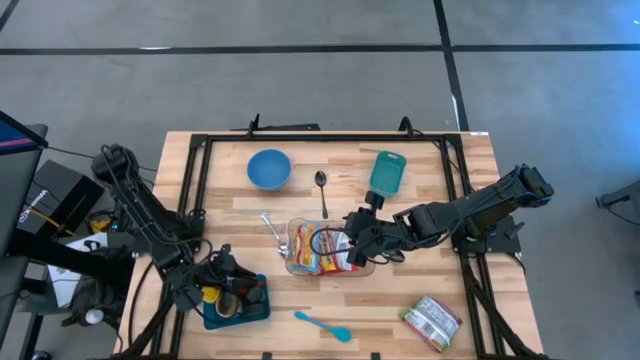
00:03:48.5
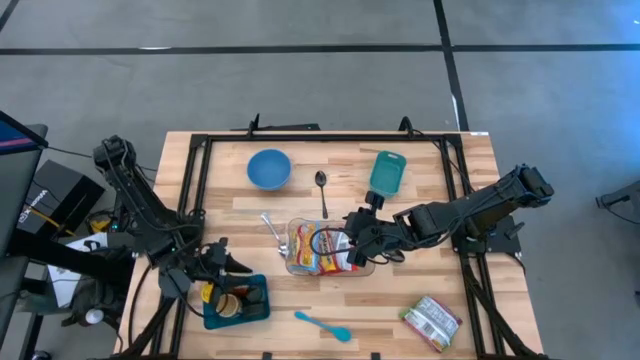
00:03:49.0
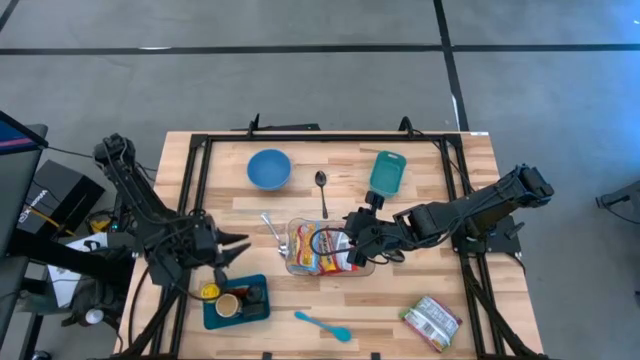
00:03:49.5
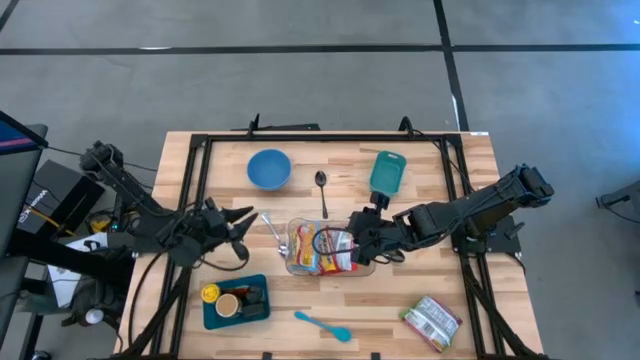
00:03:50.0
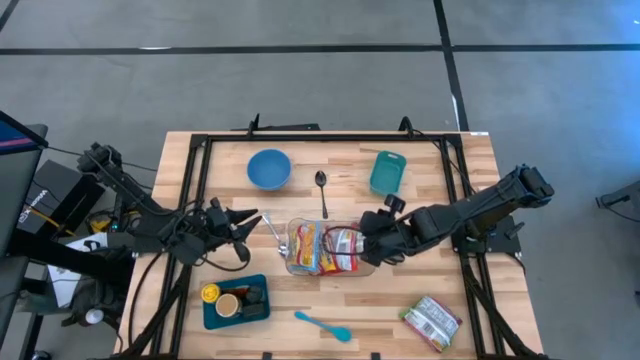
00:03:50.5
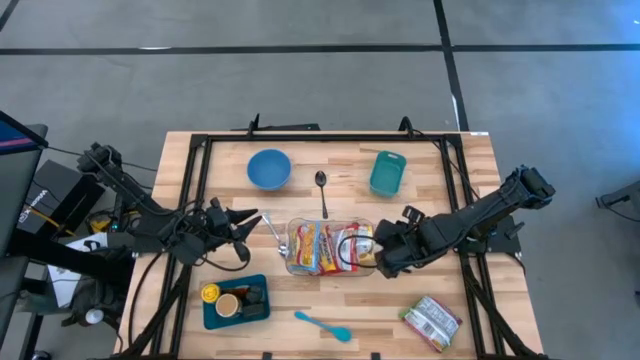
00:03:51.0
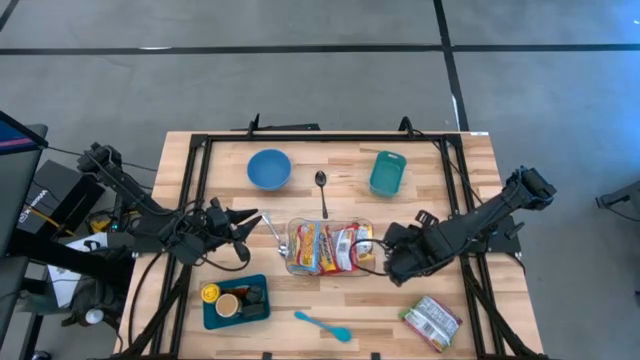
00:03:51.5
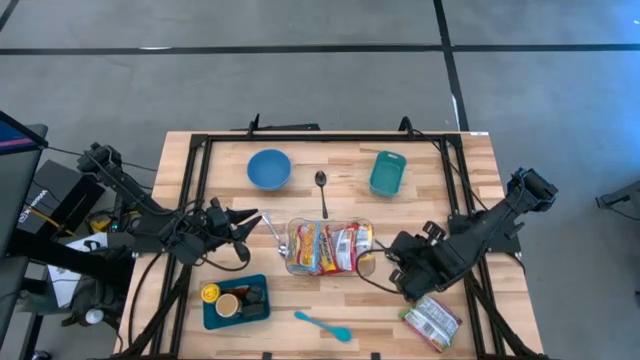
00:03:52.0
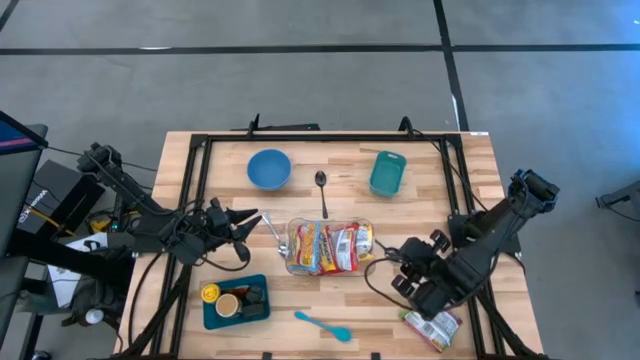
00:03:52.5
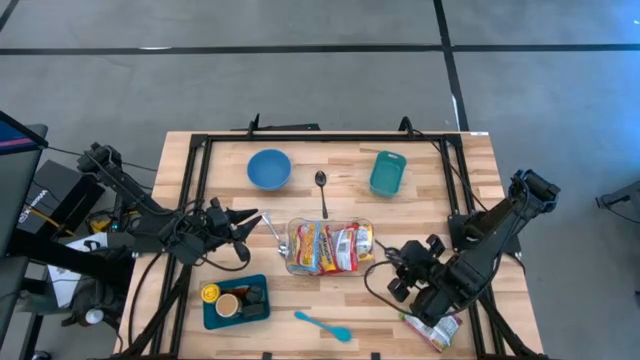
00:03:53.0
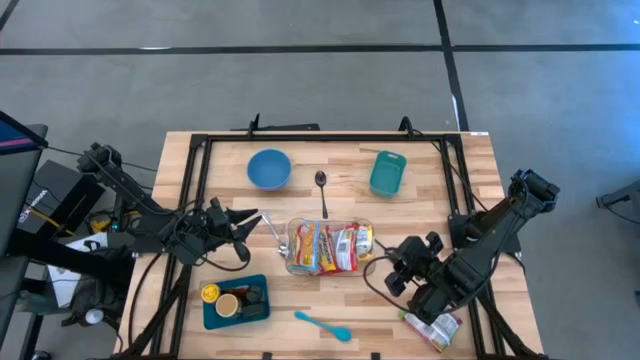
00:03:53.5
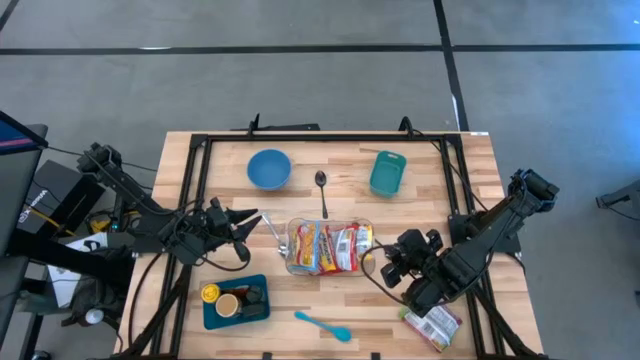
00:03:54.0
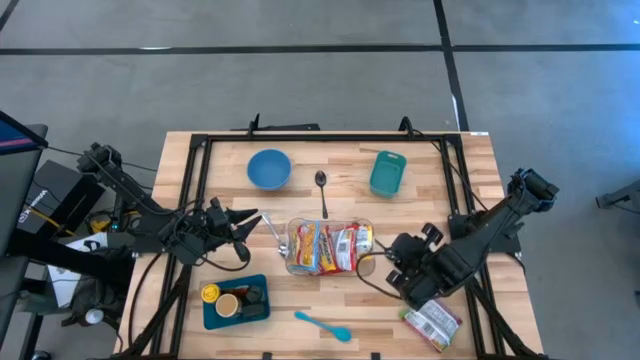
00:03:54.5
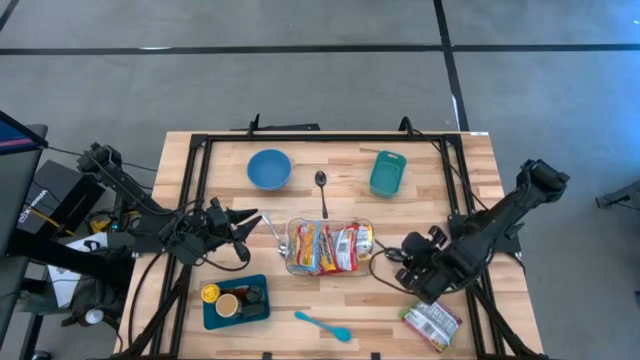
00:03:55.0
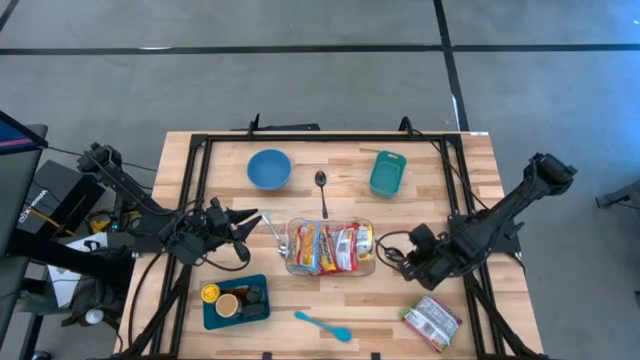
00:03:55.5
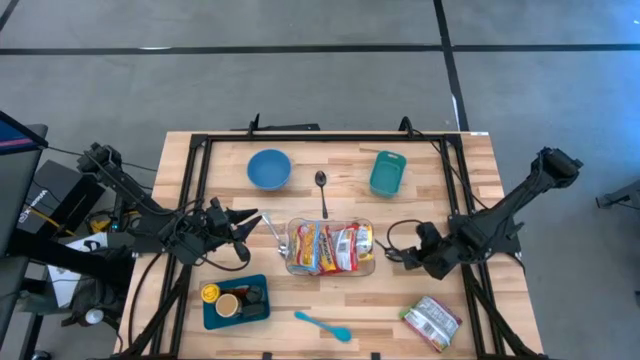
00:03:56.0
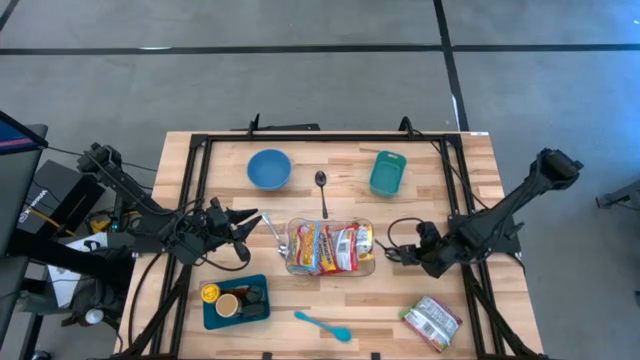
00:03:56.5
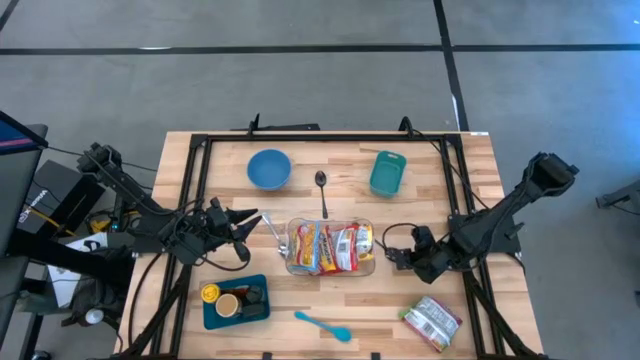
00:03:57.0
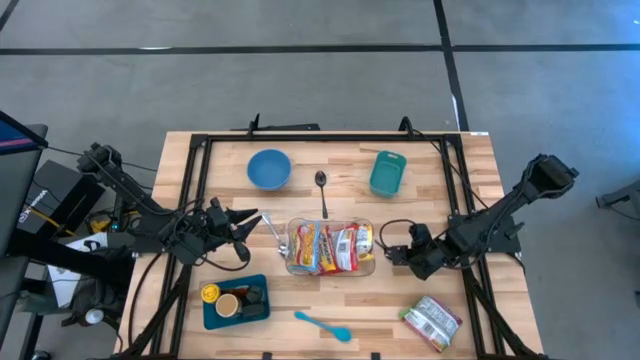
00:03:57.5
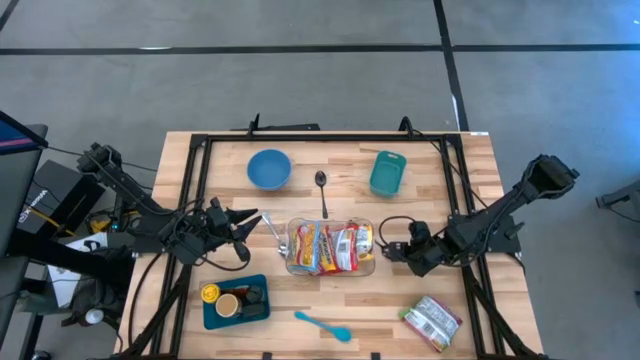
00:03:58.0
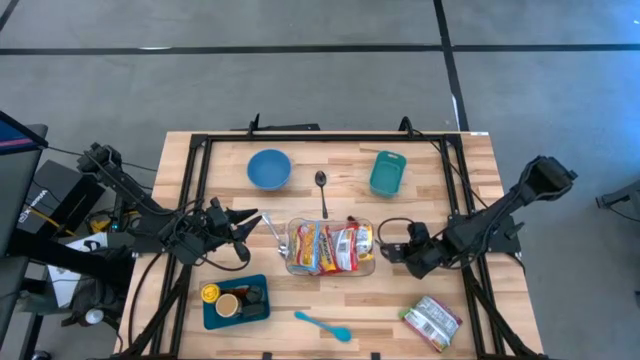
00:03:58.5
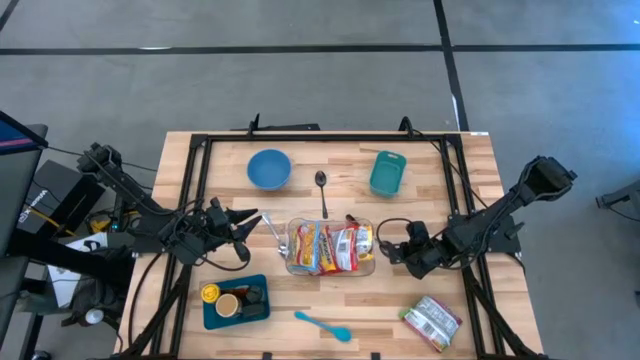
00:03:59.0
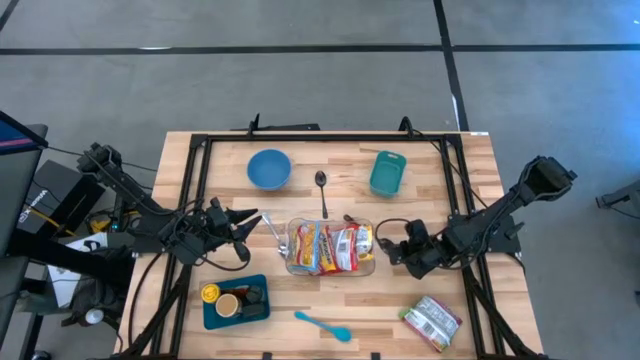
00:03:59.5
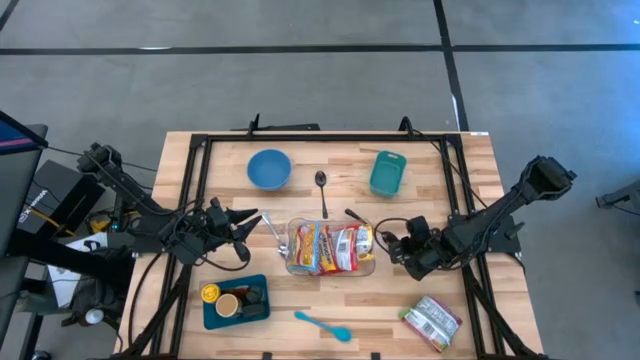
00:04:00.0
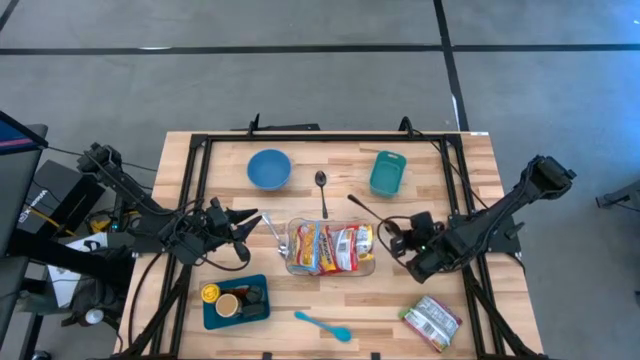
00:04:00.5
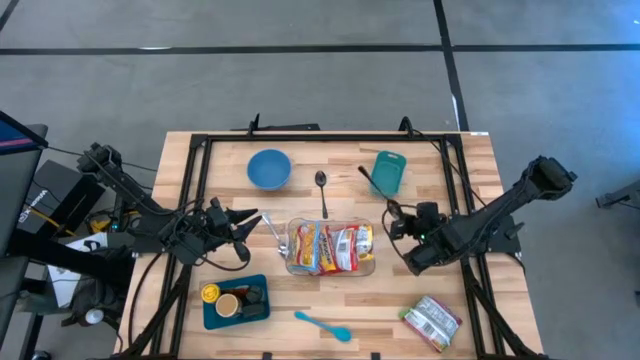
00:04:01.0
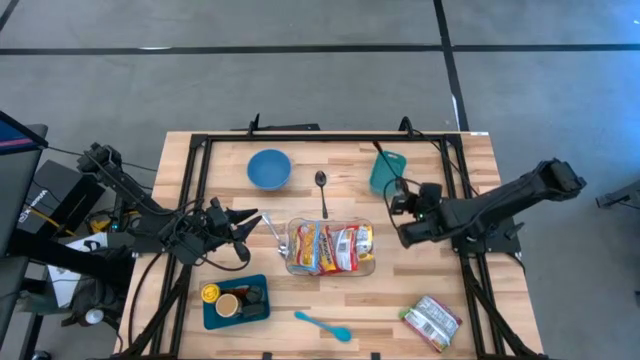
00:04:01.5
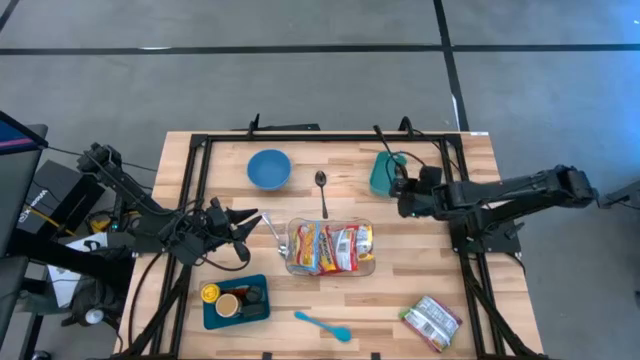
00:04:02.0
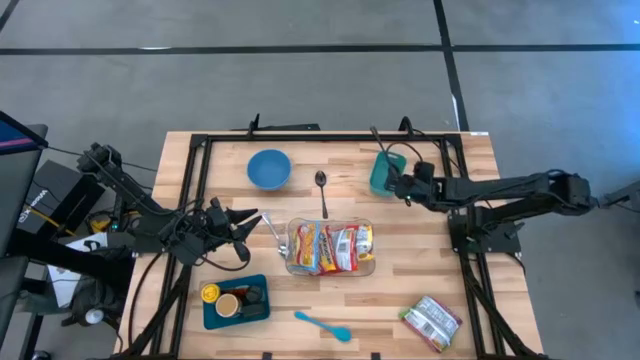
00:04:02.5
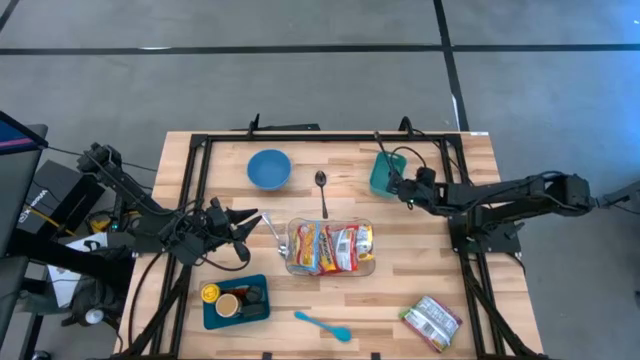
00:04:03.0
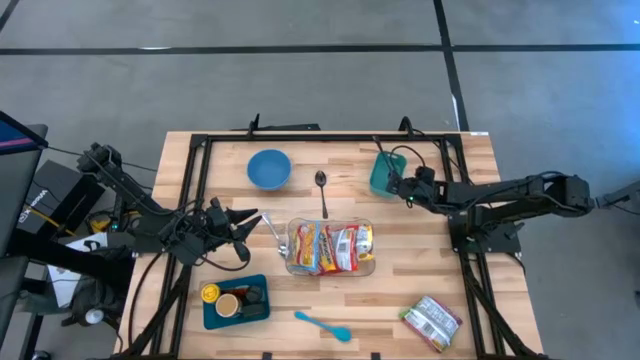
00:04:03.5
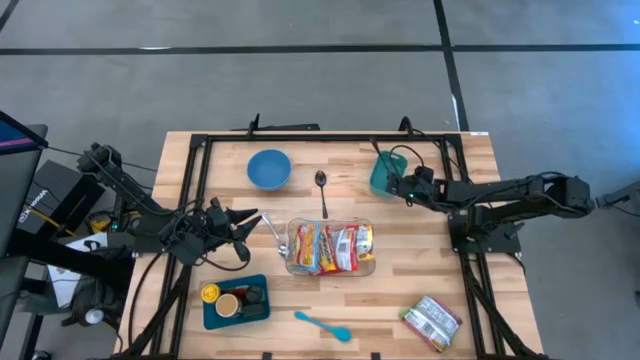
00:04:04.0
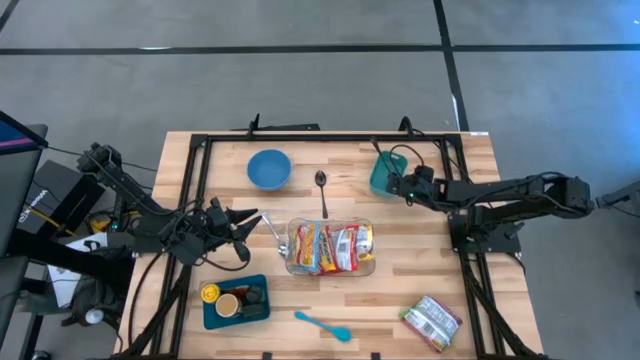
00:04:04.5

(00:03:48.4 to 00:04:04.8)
Task: Pick & Place Food Item
Put the bottom black spoon into the blue bin

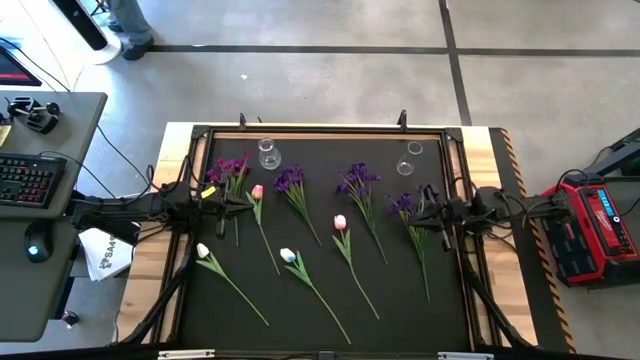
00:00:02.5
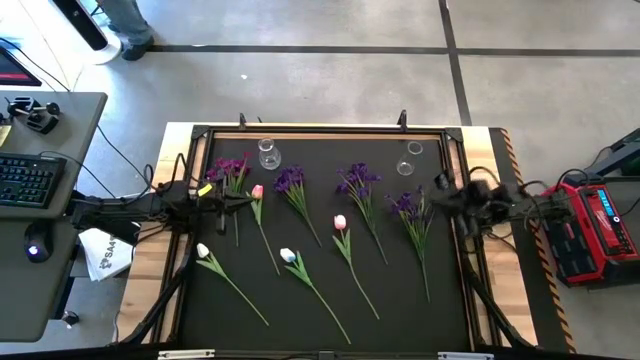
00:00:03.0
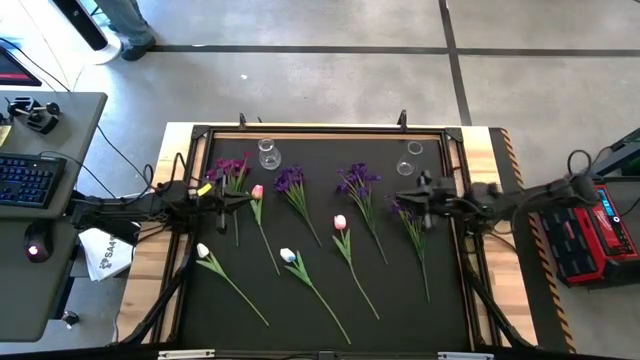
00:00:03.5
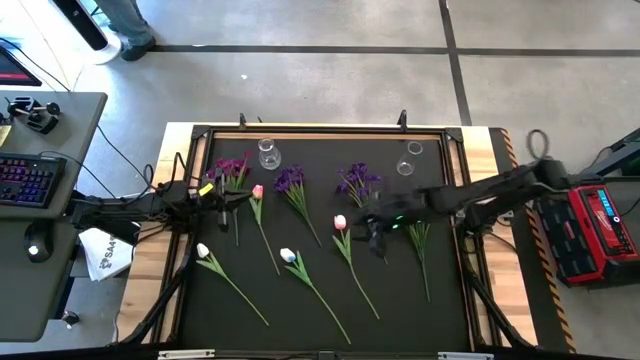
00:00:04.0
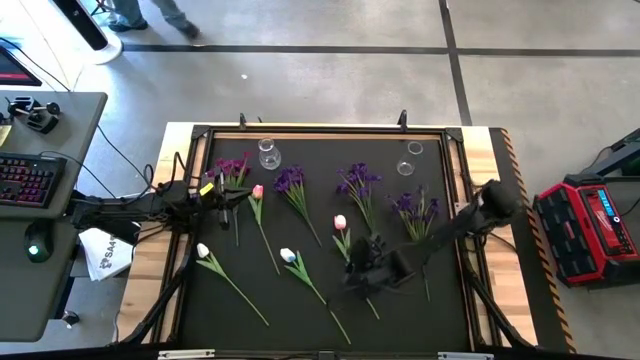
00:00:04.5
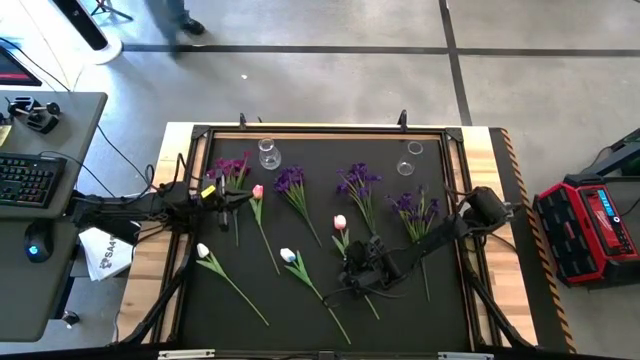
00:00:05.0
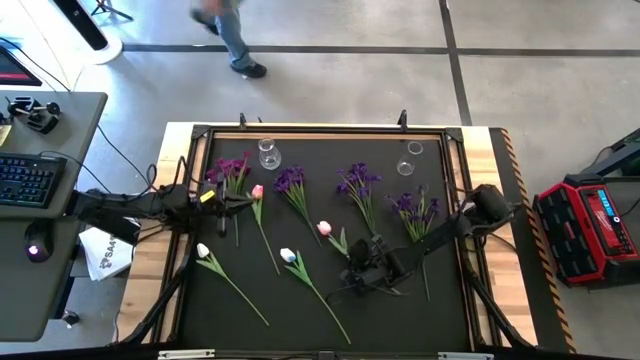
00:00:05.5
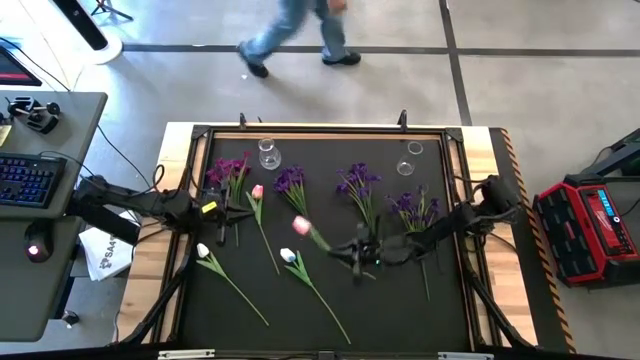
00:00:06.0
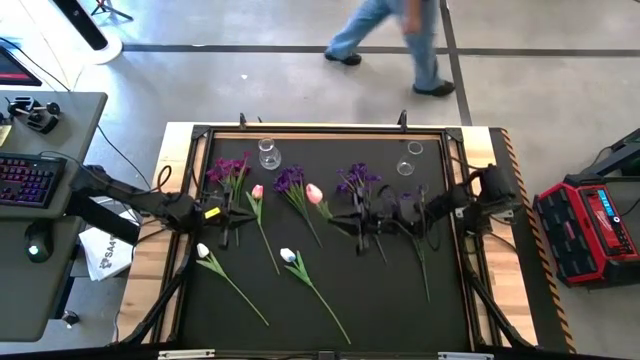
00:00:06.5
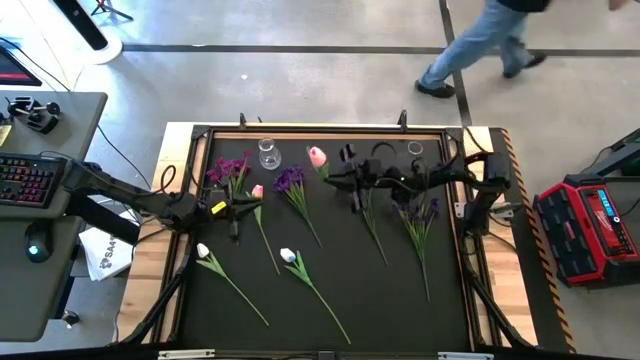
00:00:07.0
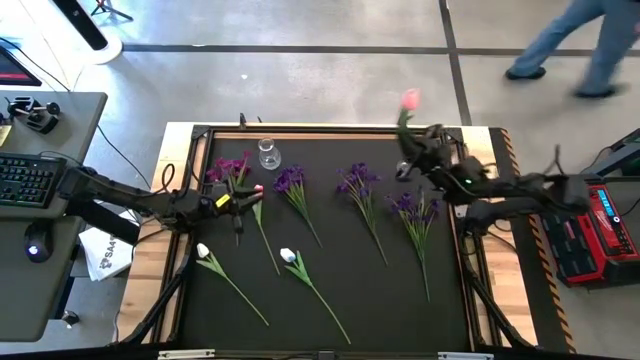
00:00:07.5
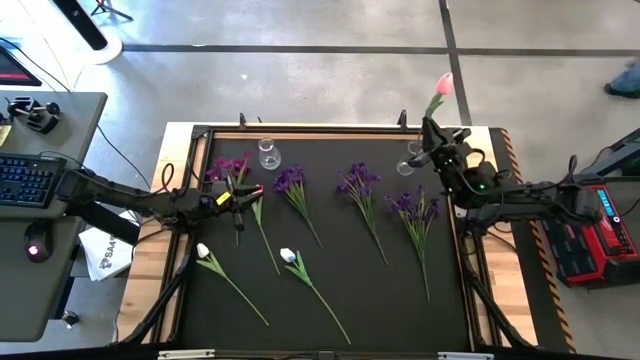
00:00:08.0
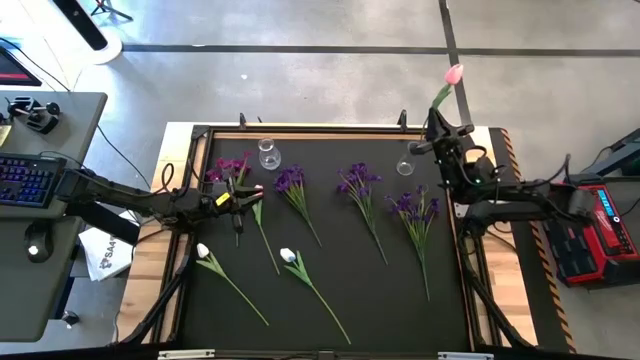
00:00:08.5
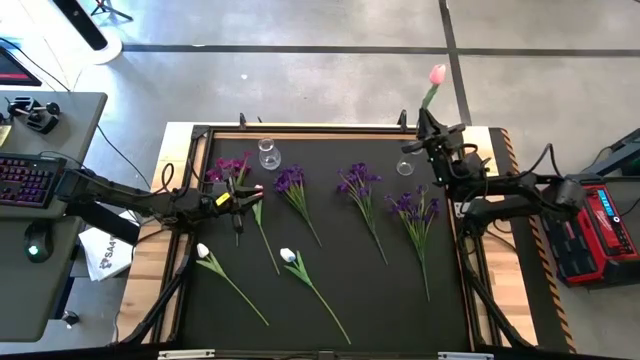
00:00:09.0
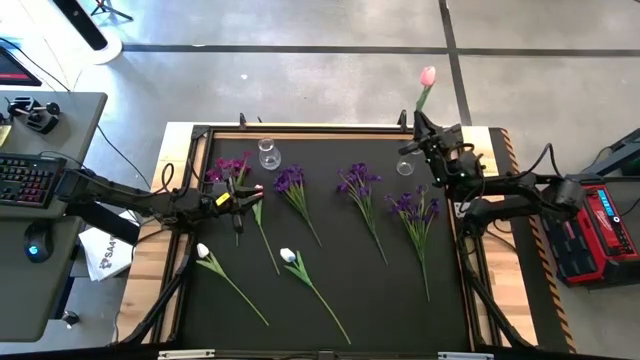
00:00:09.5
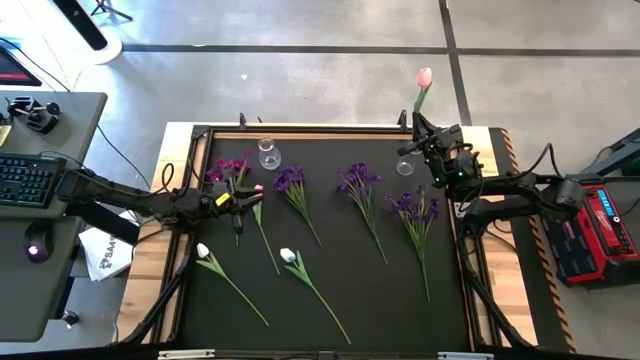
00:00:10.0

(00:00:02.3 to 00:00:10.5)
Task: Sort flowers into vase by color
Put the bottom pink flowers into the right transparent vase
